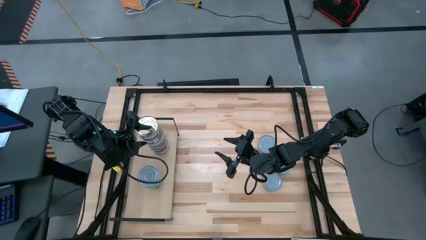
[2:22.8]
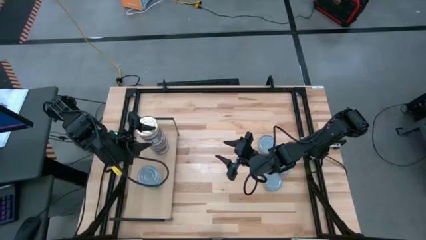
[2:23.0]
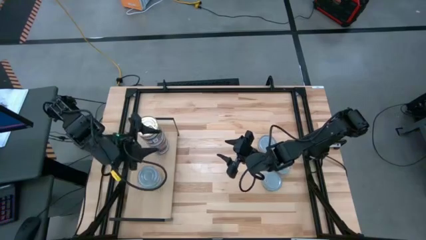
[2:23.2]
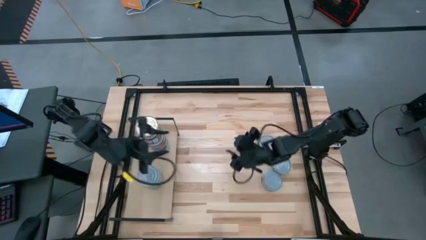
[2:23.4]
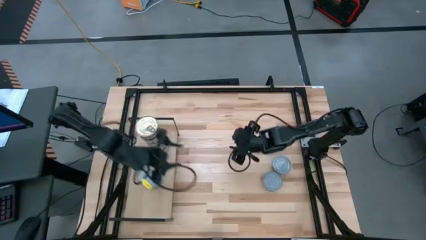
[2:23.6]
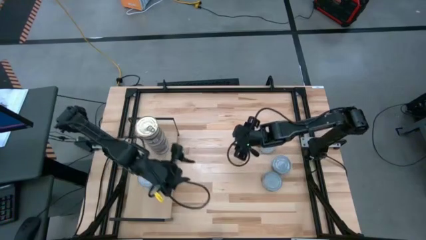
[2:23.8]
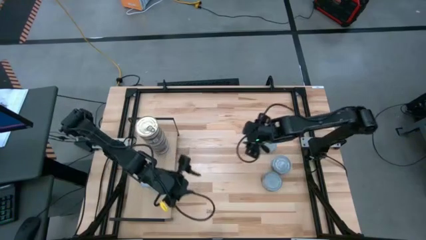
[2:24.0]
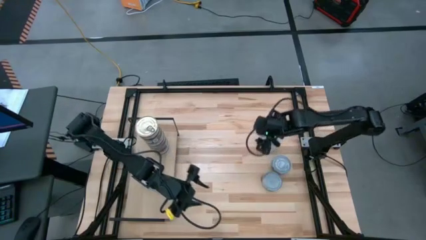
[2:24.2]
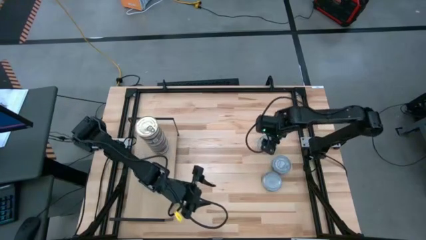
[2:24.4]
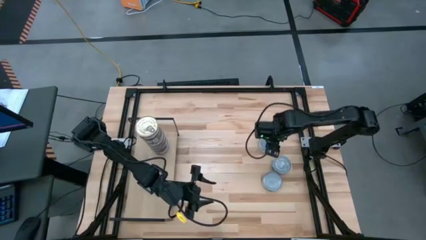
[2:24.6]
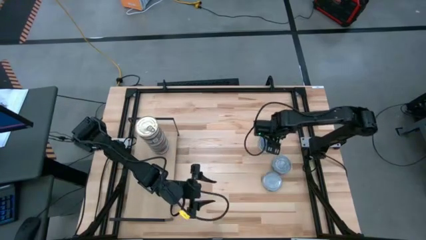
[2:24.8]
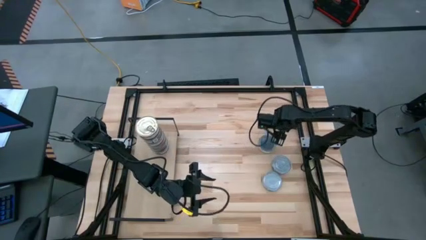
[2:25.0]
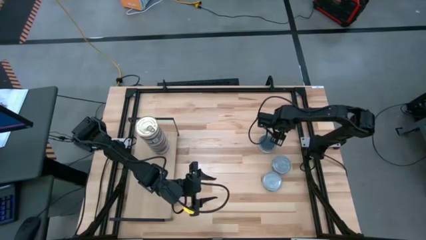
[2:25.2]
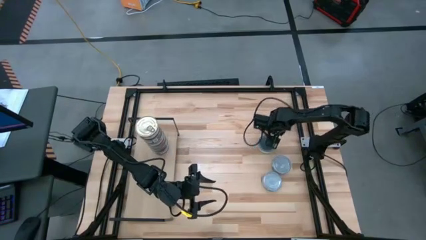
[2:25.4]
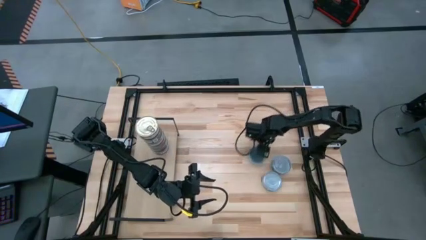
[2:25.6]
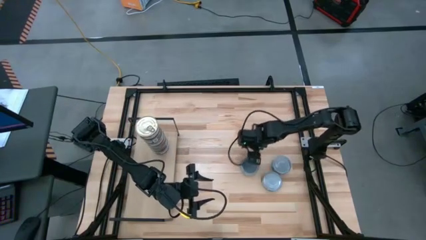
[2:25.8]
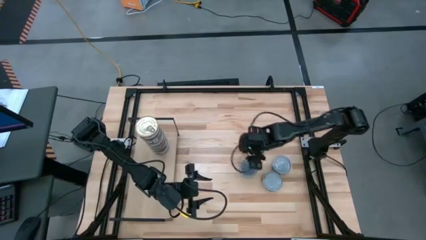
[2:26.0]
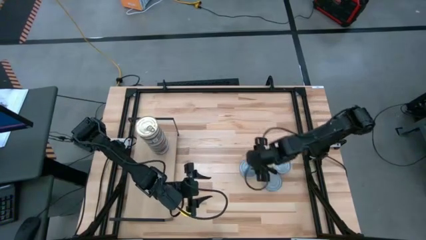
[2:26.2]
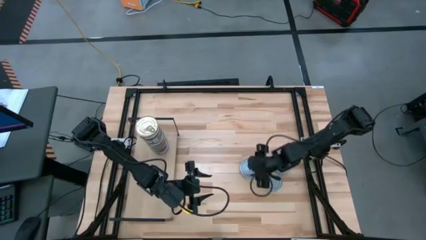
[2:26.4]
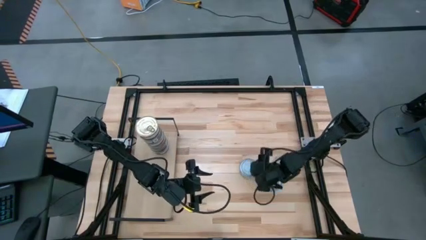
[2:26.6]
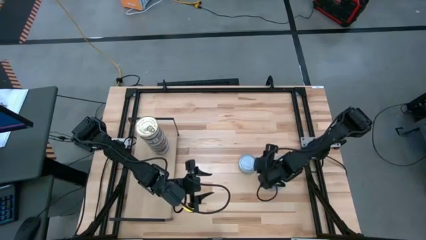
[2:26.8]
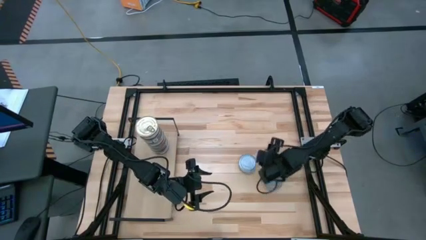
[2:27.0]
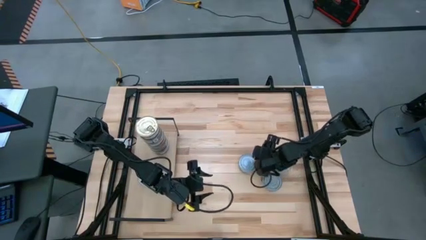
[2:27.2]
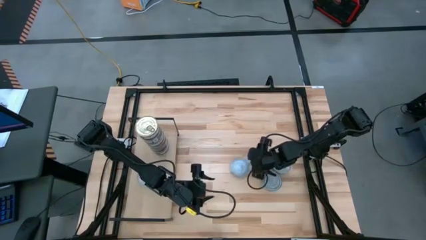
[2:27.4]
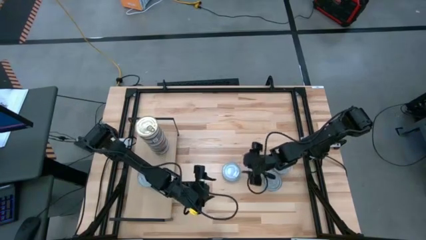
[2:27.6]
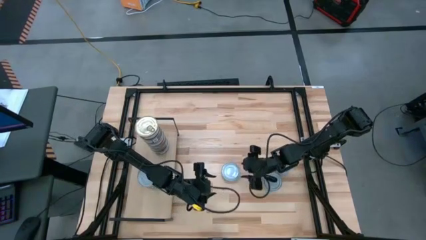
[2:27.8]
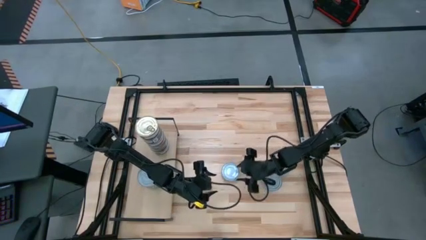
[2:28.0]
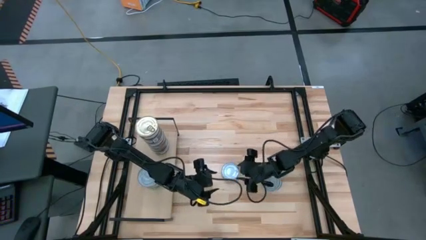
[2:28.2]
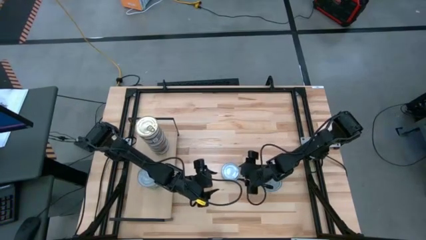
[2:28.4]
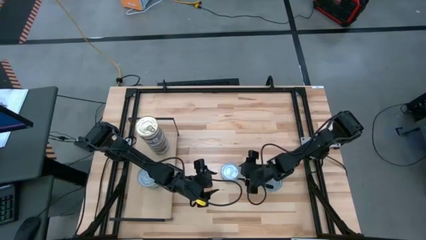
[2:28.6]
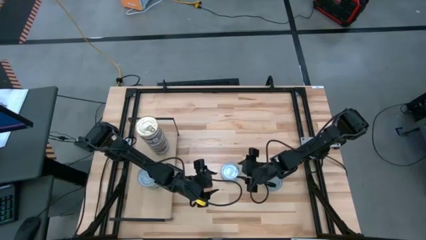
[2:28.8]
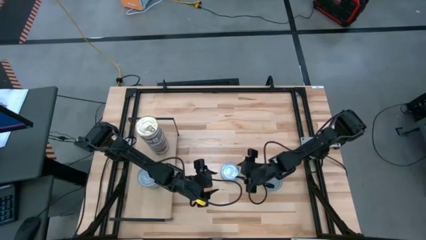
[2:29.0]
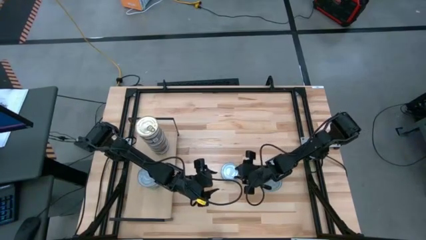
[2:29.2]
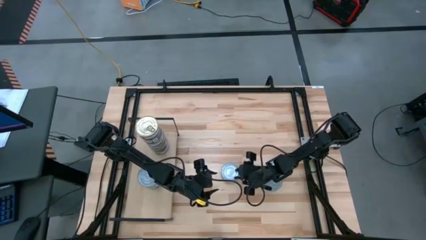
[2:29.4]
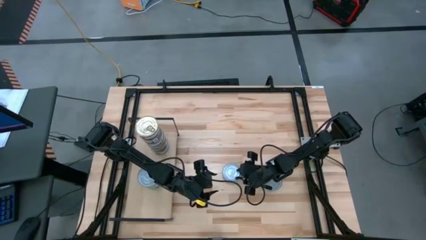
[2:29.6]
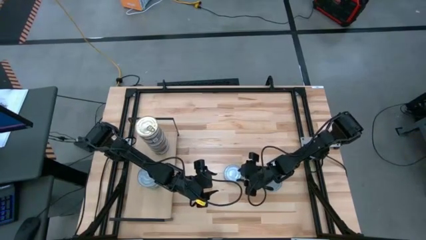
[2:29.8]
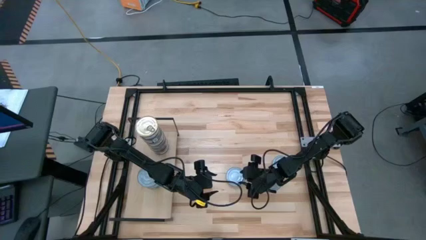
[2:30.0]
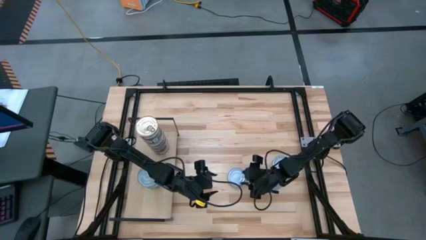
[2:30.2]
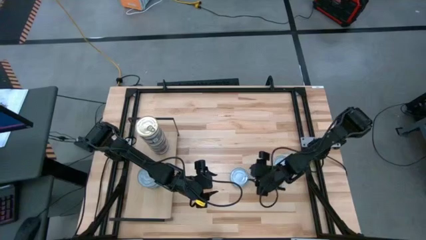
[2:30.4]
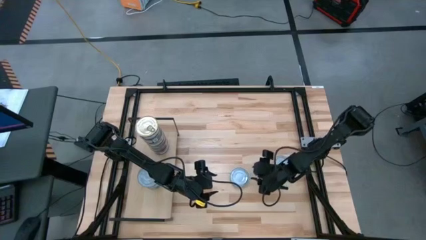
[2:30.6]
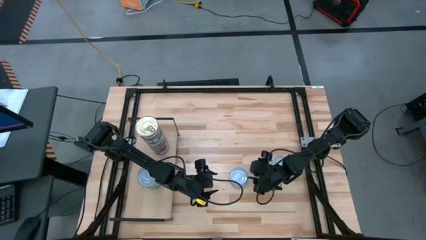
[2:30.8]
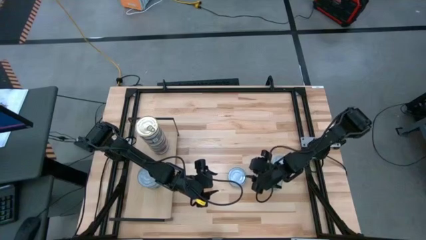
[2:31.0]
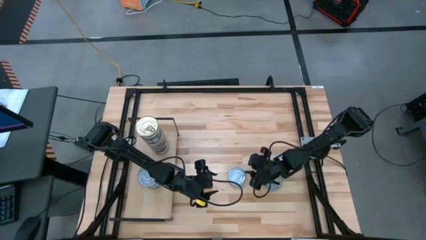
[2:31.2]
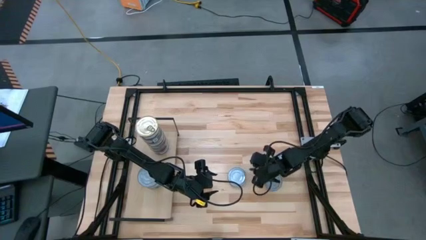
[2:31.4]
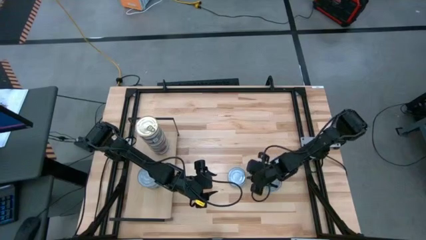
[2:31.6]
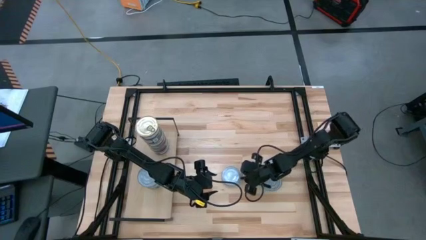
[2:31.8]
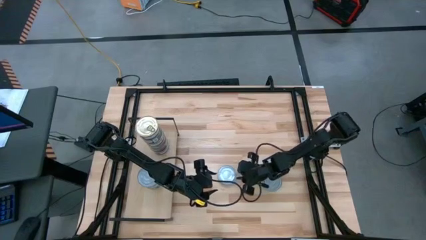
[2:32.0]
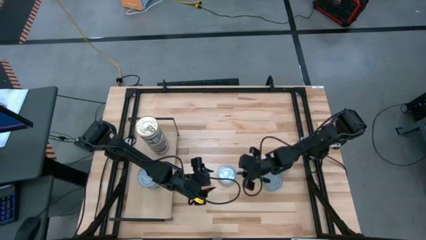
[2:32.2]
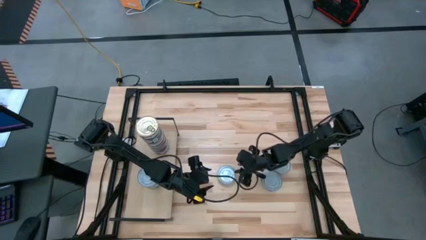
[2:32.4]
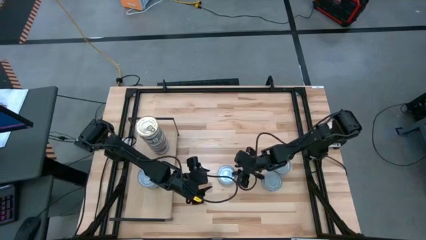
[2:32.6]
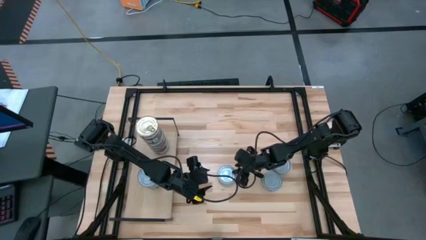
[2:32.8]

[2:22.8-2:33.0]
Task: Stack canned seafood by type on shelf
Stack the top green and white tuna can on the green and white tuna can on the shelf

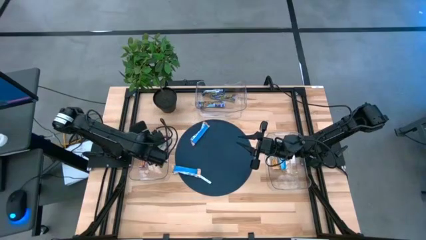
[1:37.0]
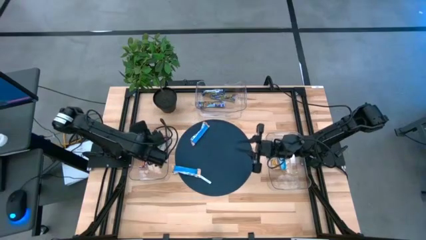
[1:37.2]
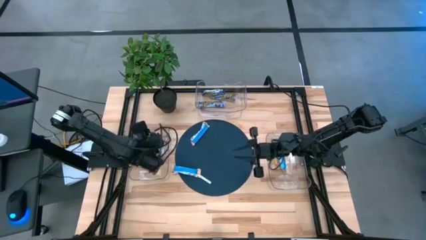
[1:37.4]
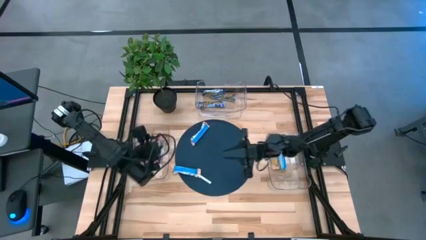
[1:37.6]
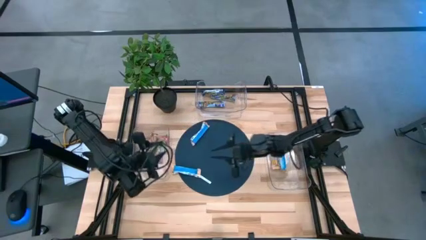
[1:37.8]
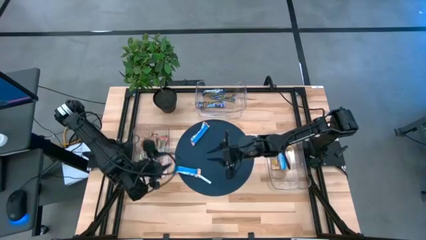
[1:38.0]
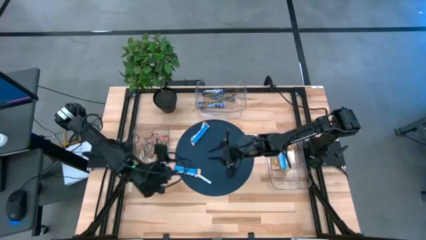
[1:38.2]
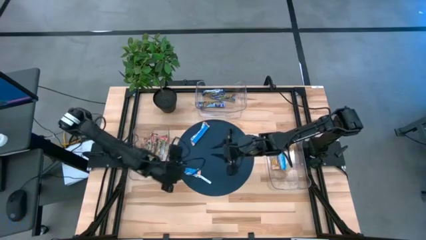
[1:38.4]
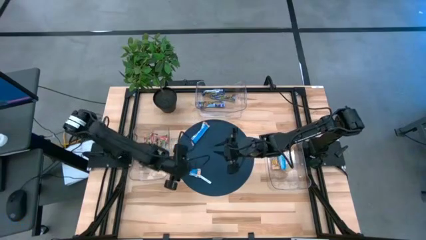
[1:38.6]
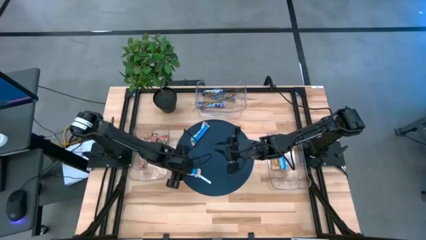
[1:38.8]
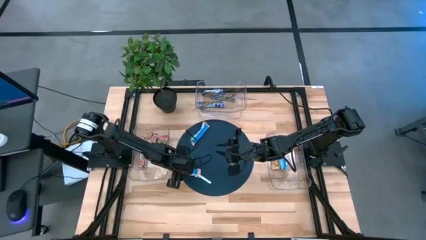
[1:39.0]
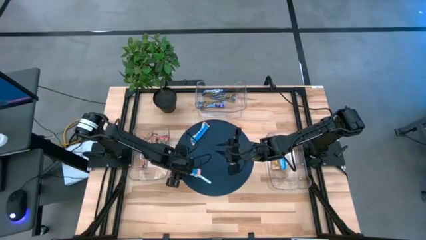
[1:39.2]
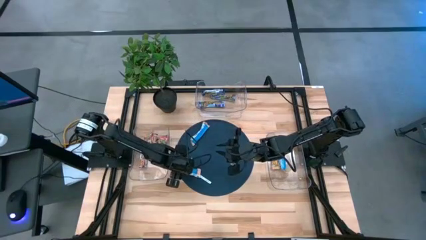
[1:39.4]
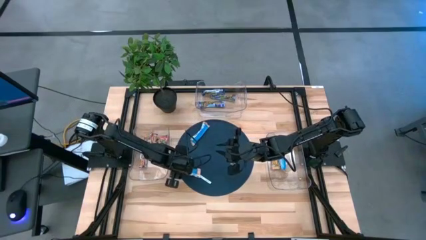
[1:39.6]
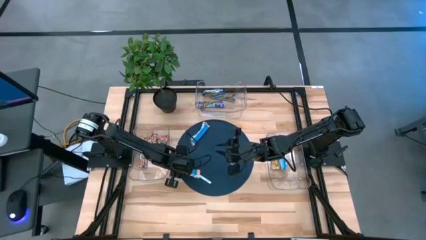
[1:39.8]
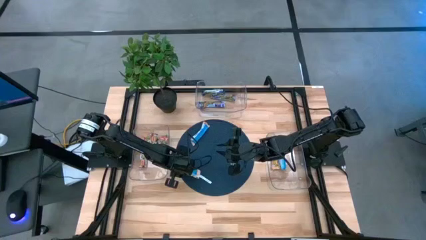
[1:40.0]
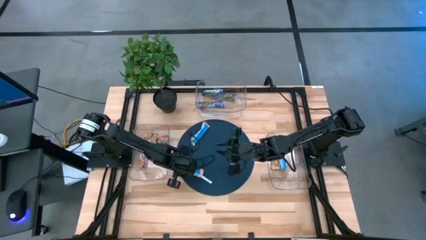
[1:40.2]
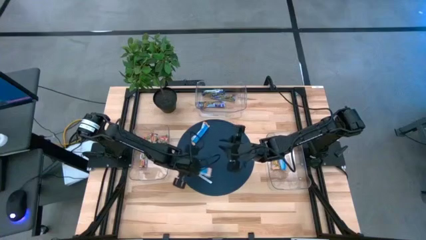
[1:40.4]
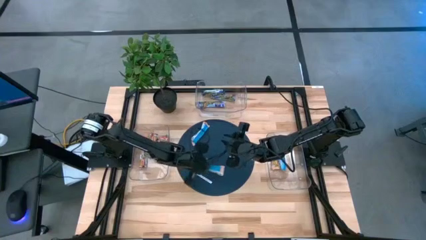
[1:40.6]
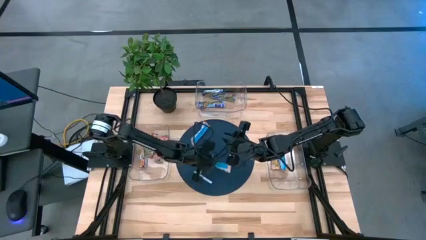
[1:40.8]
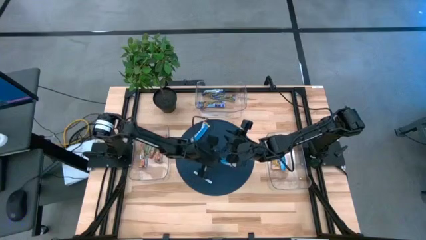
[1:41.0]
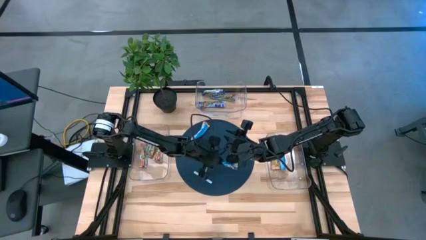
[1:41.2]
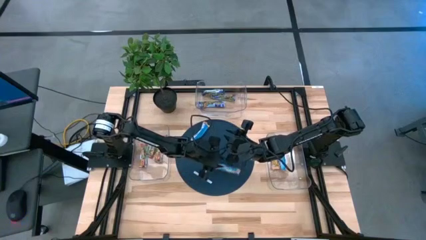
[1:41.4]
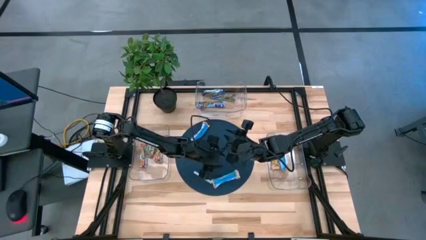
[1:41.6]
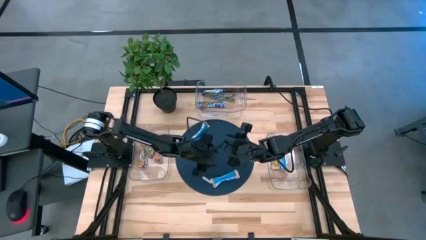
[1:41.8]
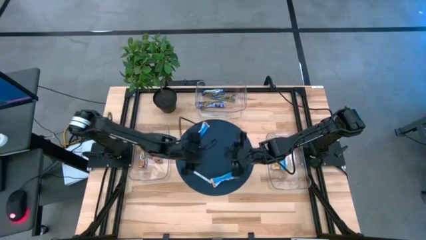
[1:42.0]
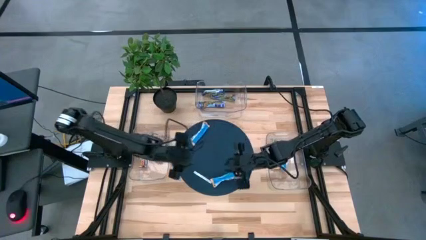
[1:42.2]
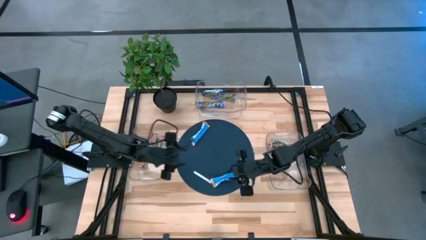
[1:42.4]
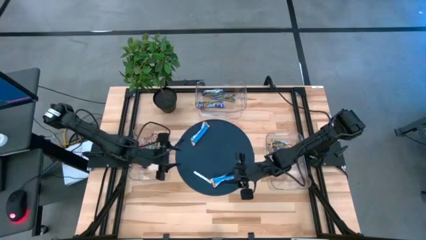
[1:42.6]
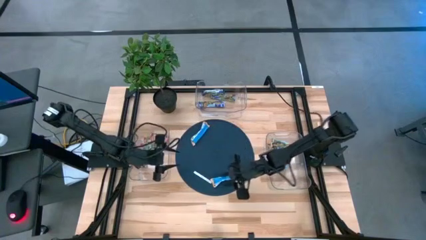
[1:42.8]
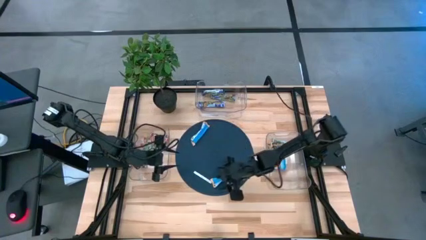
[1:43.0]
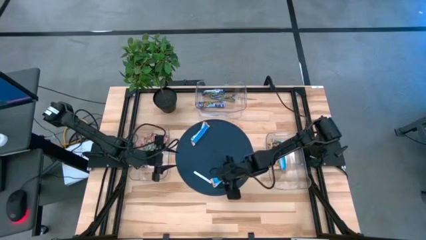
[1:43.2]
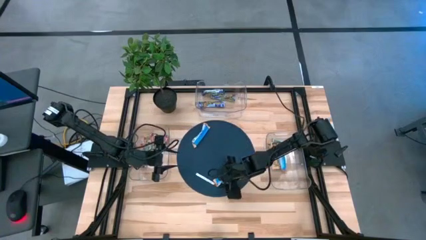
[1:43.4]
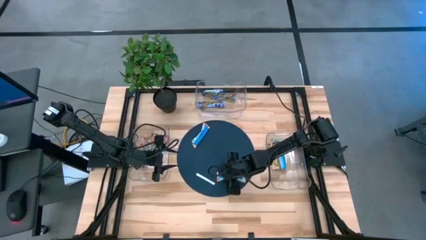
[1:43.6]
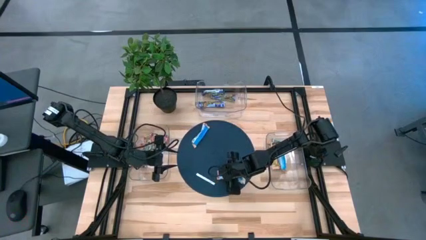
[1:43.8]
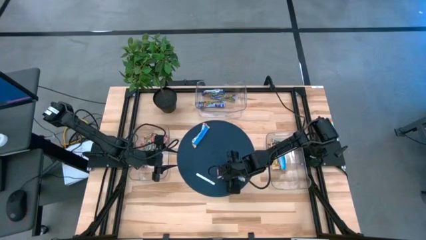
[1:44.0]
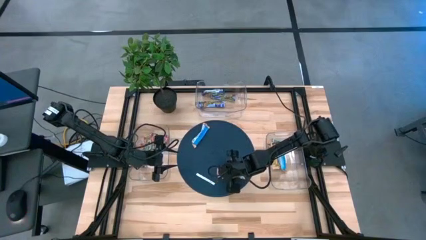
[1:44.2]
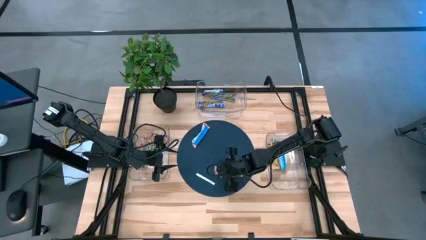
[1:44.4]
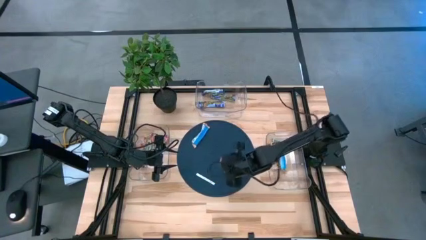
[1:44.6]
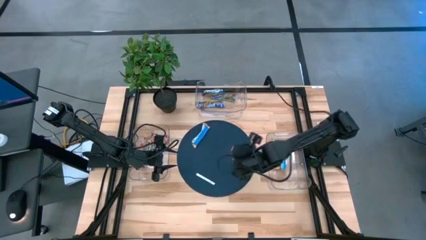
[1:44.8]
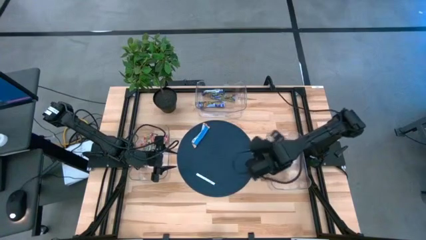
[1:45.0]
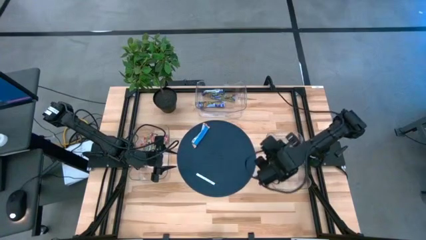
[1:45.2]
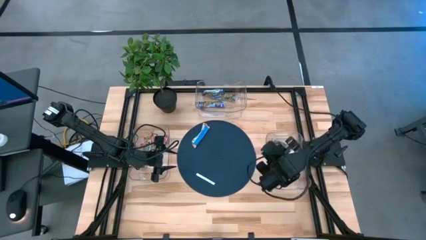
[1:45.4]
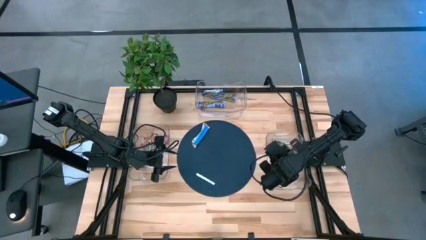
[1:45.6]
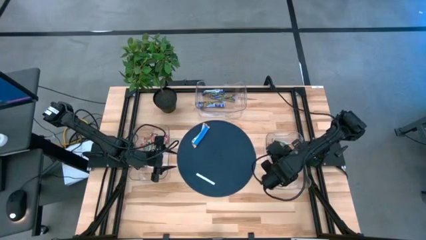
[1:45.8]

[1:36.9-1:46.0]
Task: Pick and place Granola Bars by type
Put the bottom orange granola bar into the right transparent bin
